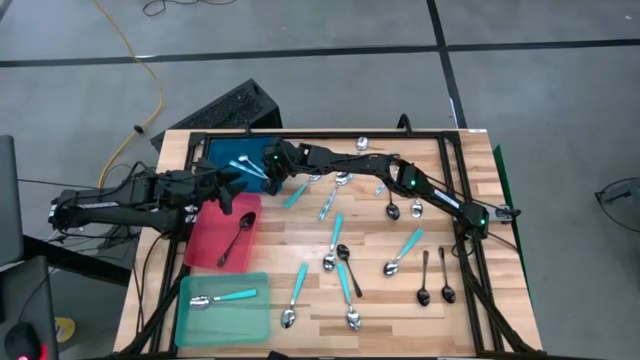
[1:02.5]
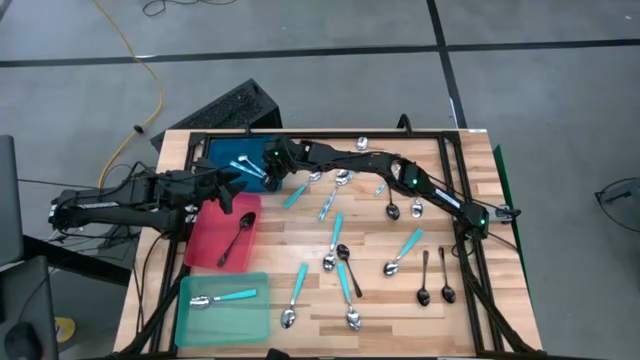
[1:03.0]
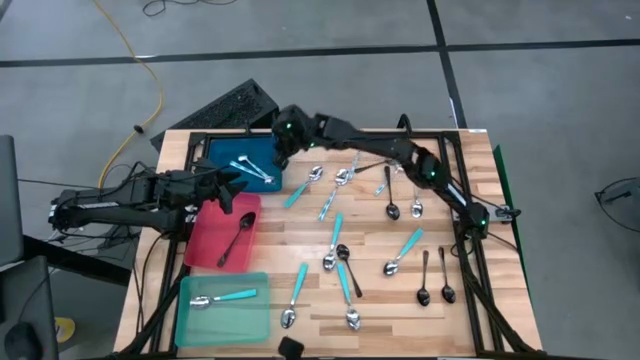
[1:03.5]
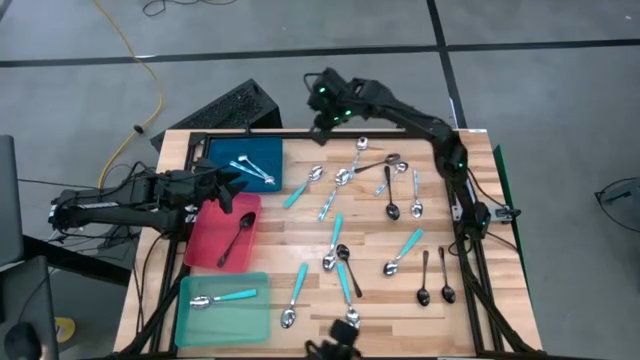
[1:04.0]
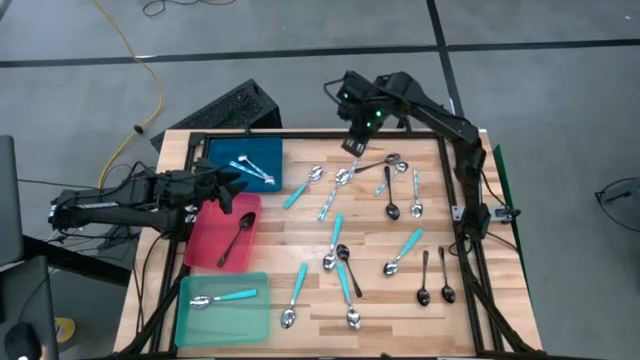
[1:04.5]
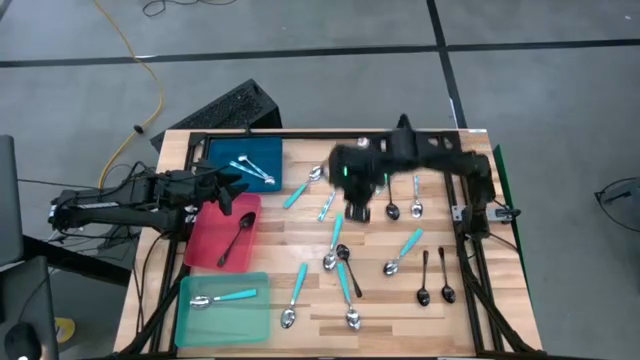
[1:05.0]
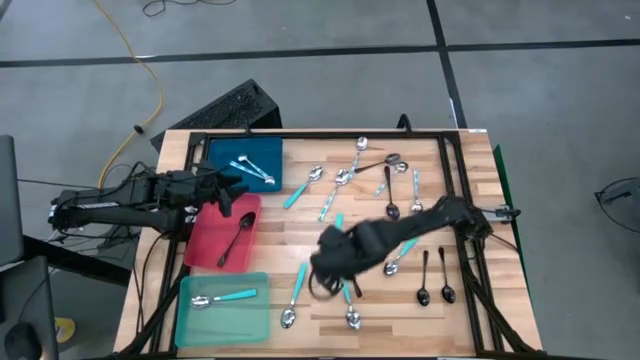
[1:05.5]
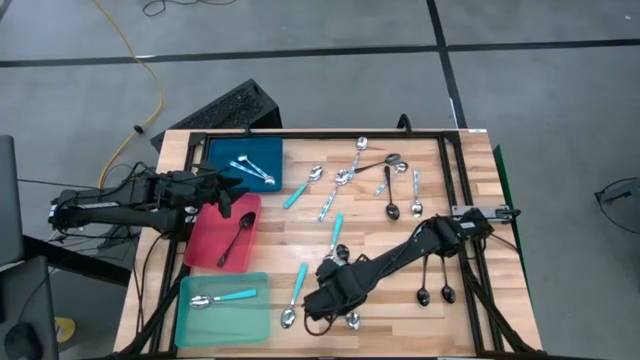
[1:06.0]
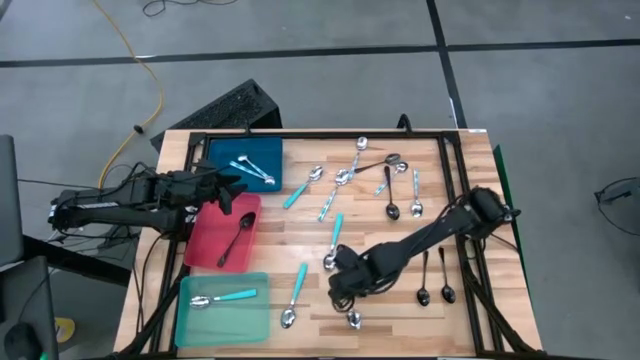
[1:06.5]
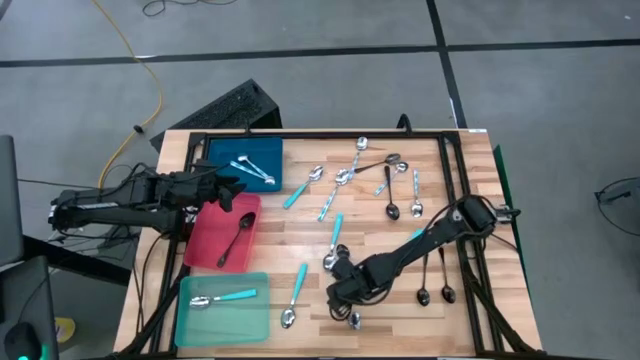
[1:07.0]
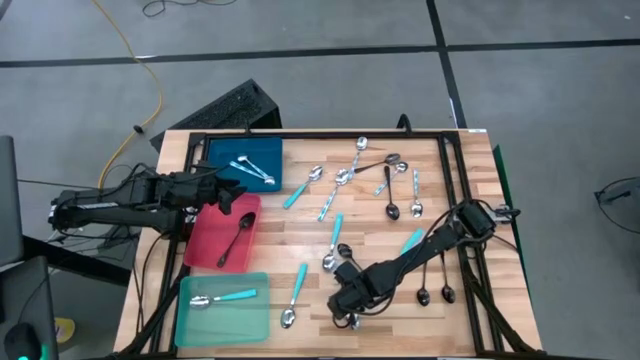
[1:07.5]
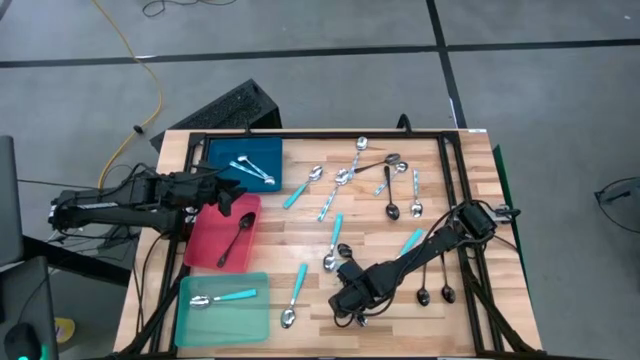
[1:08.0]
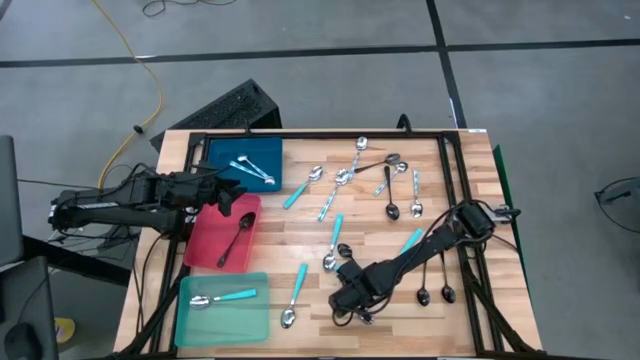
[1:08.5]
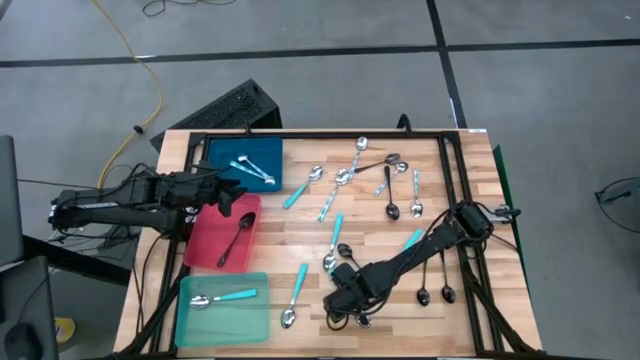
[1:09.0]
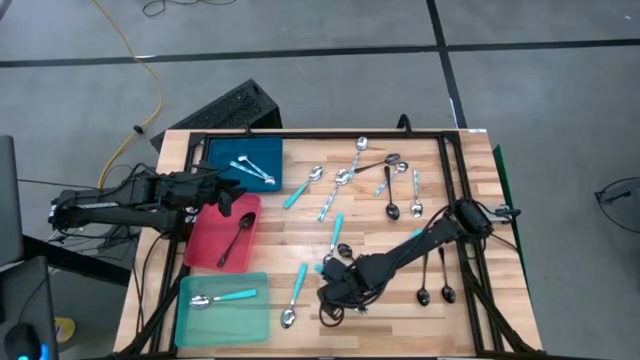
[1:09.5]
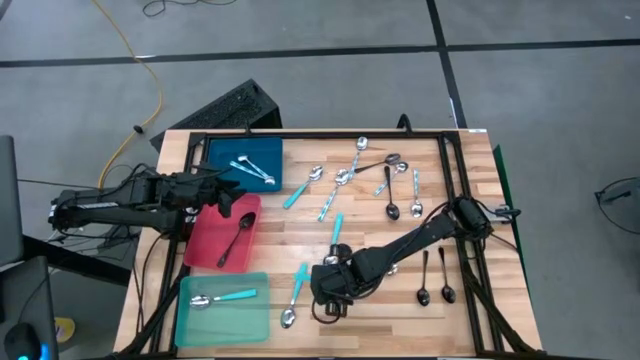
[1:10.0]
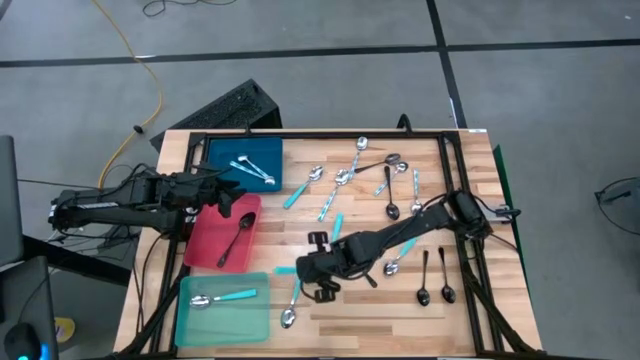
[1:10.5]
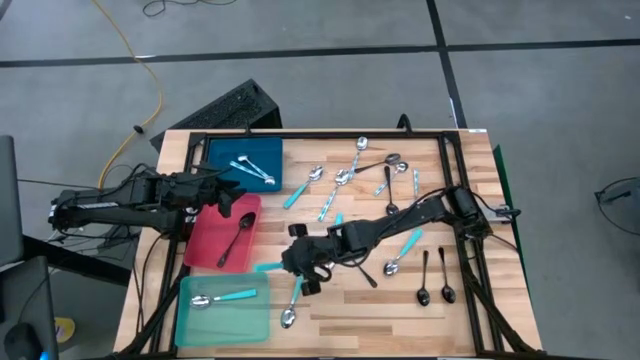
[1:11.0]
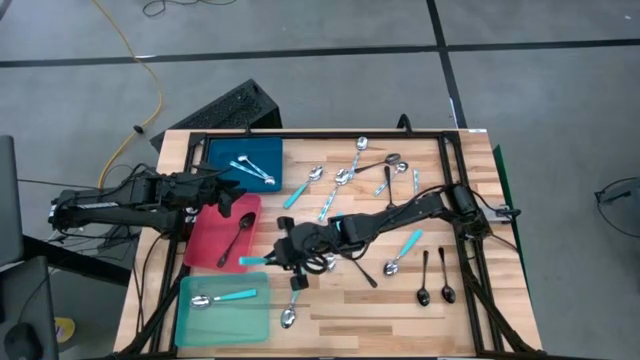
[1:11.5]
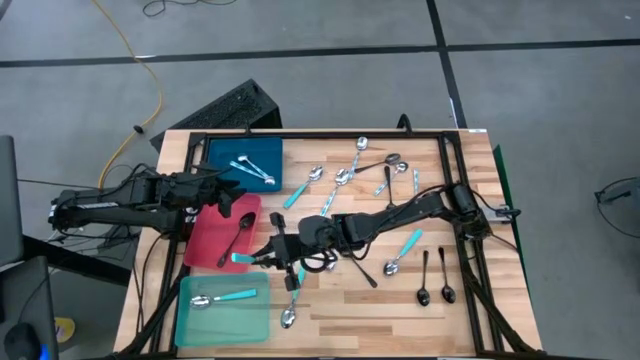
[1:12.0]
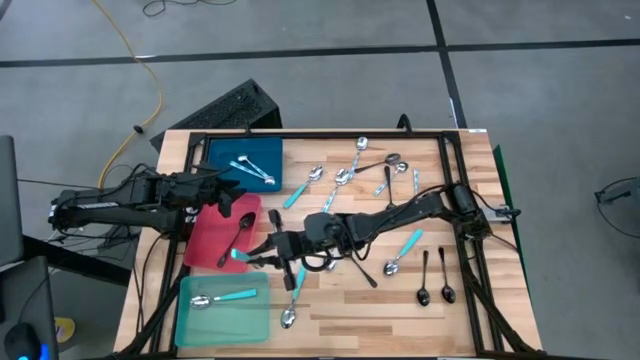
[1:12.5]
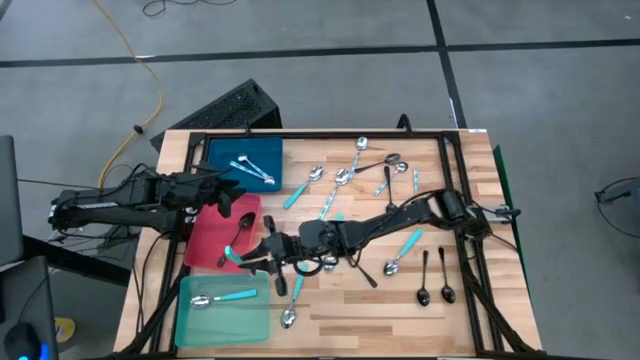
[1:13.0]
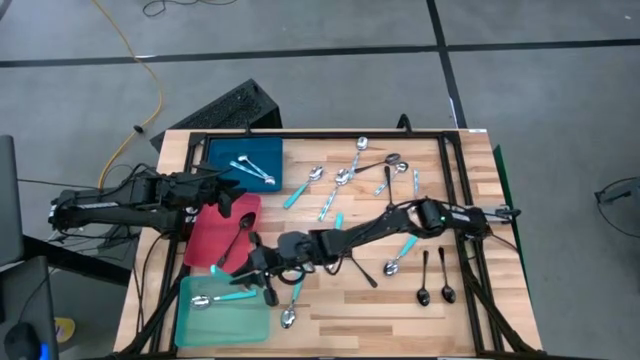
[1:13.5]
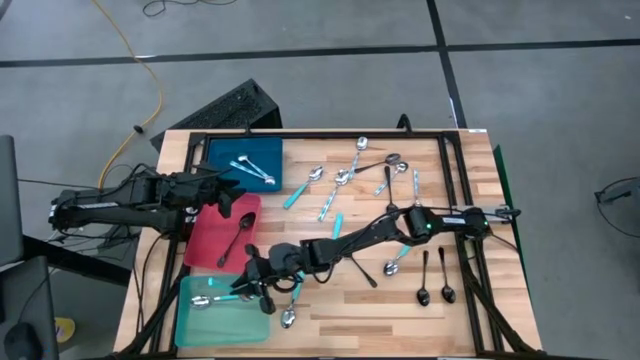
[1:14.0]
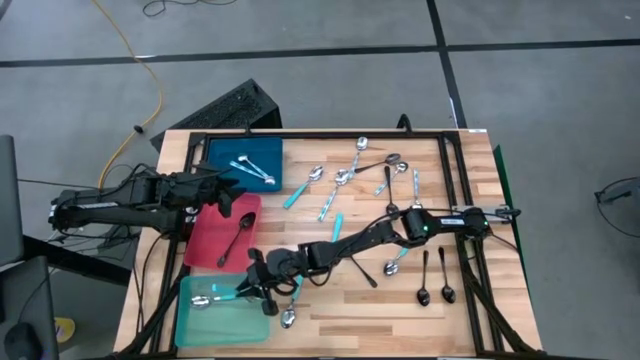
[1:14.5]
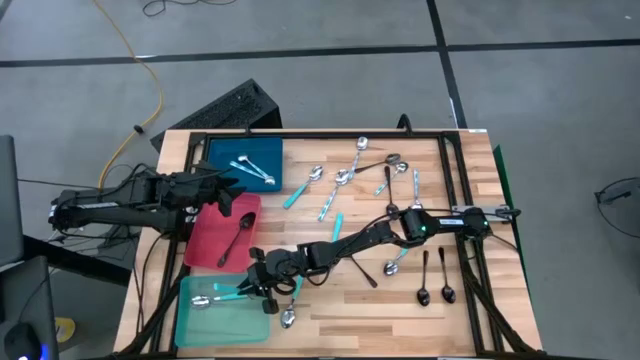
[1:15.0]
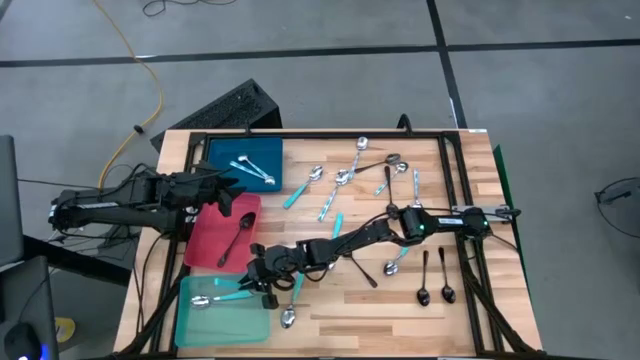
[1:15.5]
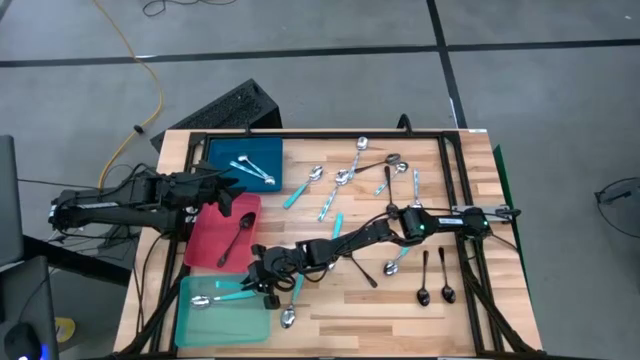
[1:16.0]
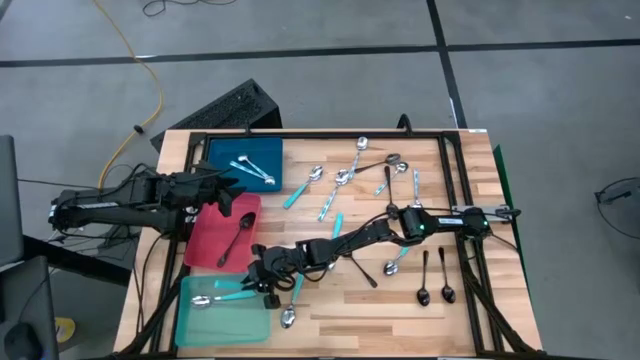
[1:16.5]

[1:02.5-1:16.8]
Task: Sort silverware by color (type)
Put the light blue spoon into the light blue bin

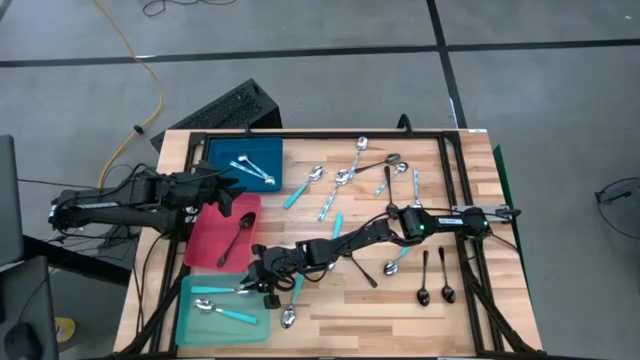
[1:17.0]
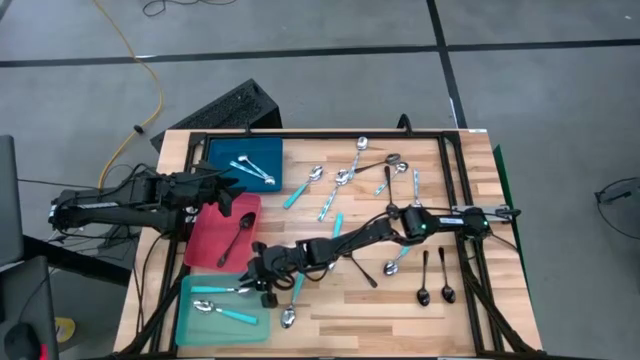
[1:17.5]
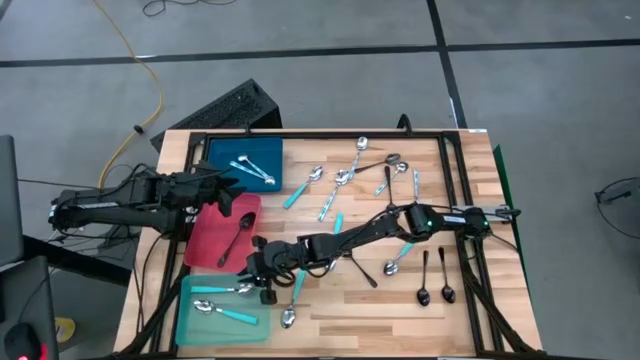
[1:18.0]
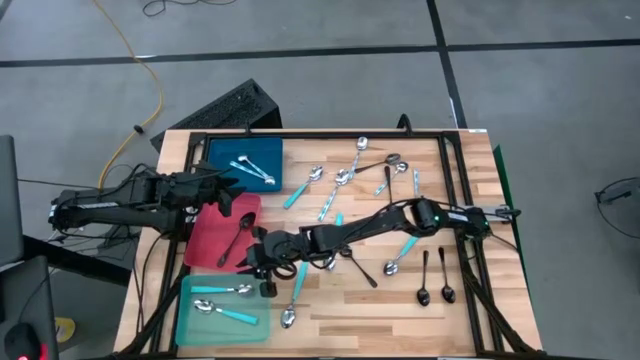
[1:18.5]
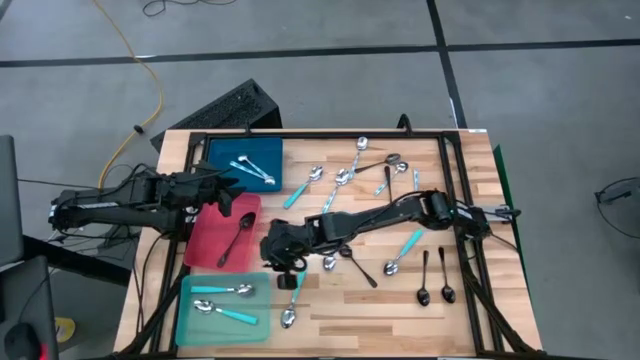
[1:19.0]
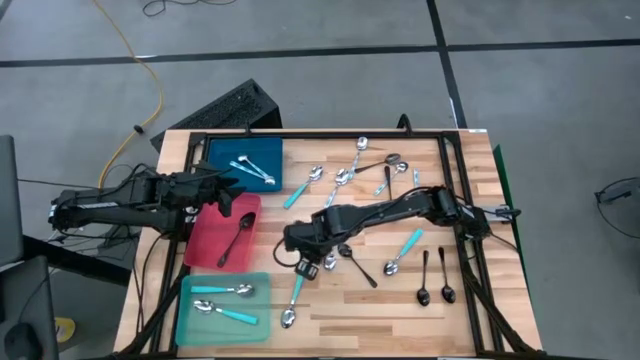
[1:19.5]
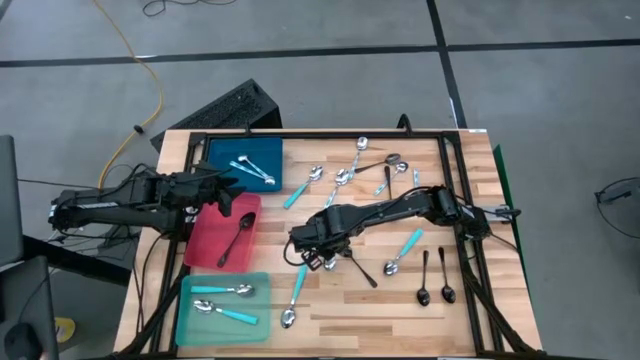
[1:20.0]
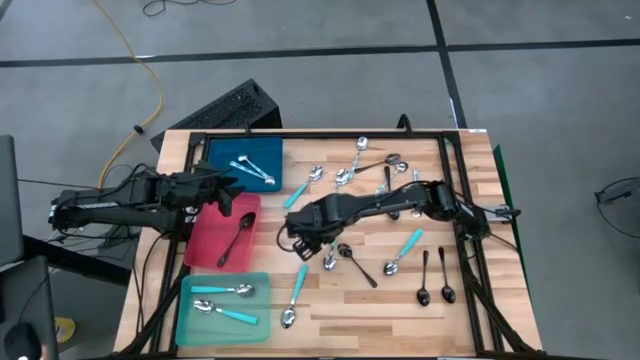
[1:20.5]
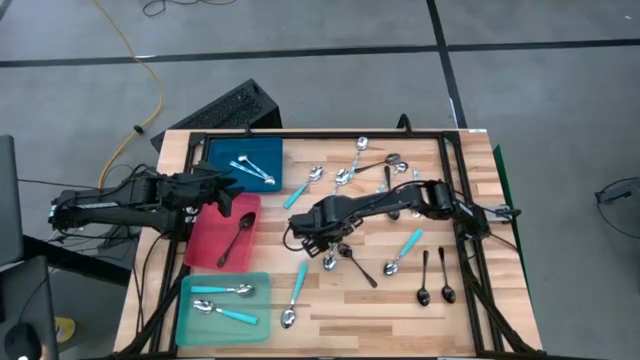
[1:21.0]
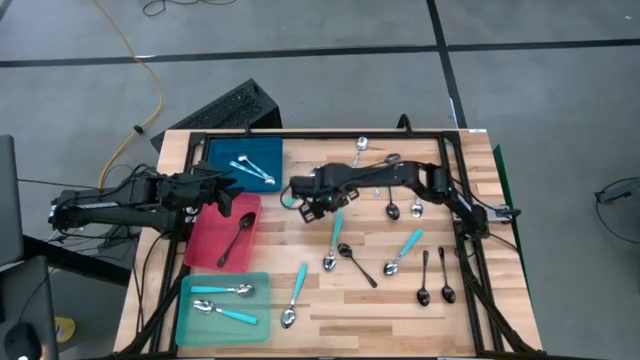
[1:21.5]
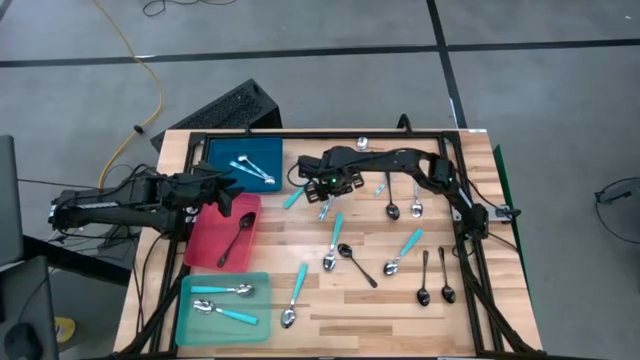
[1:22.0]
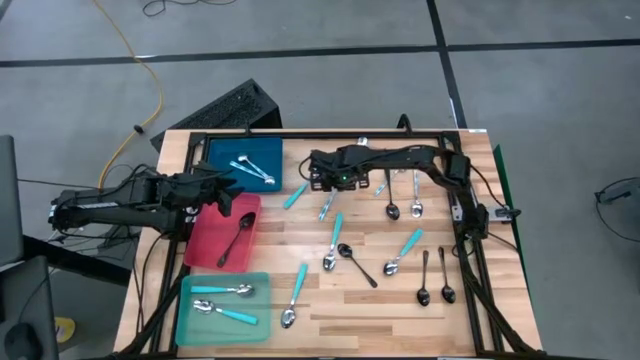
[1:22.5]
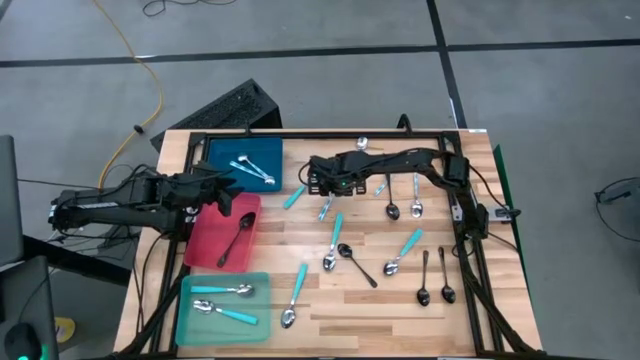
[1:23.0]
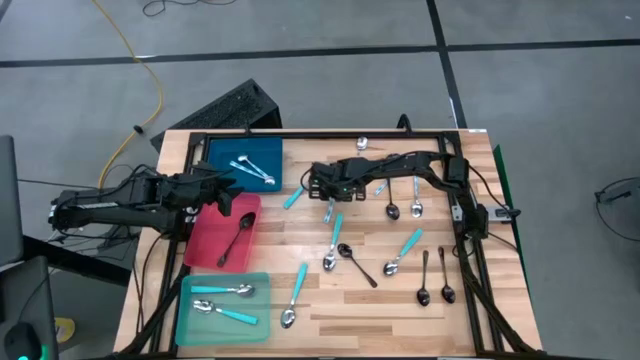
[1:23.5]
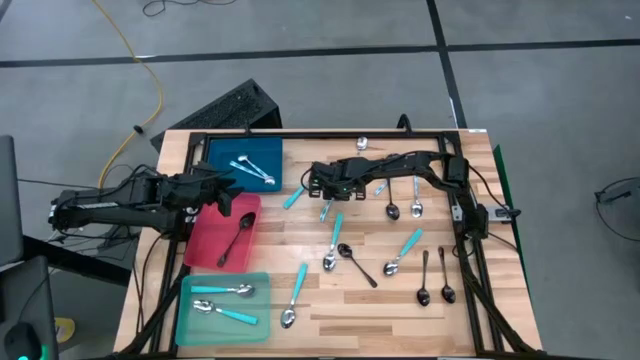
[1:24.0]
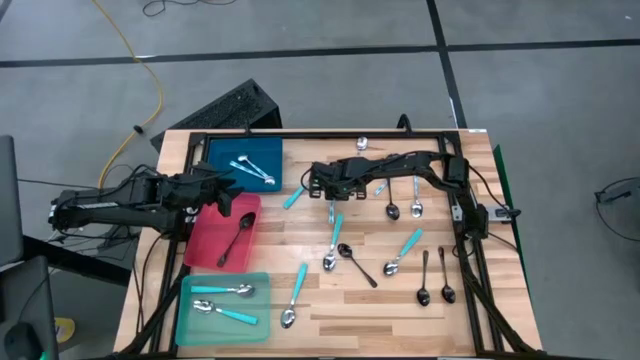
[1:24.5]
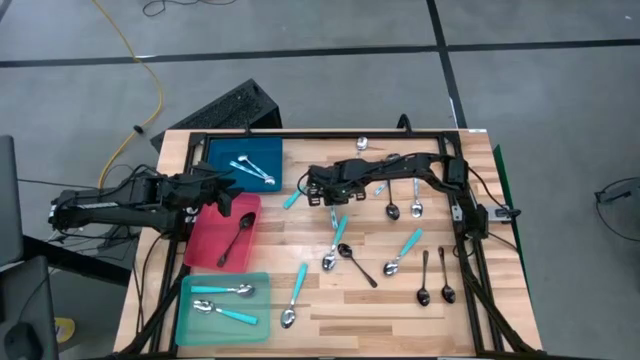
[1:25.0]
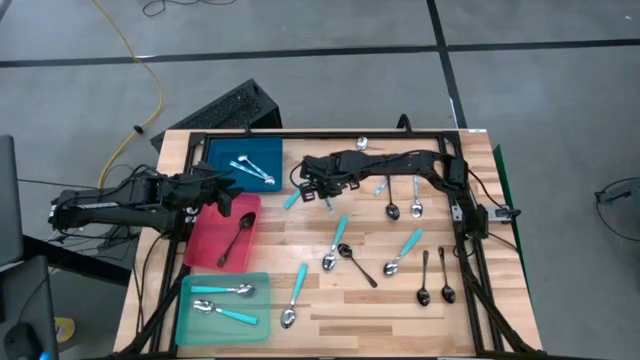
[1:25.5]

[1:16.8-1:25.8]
Put the blue patterned spoon into the blue bin
